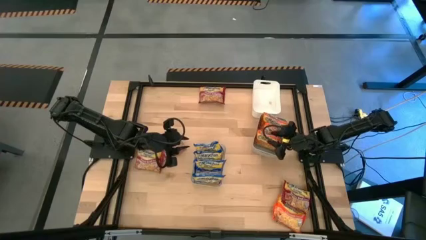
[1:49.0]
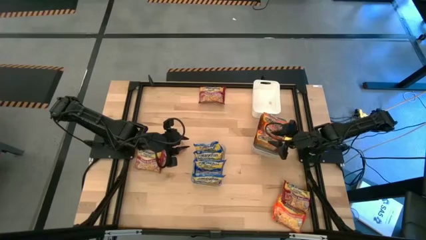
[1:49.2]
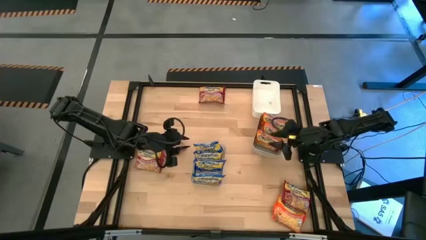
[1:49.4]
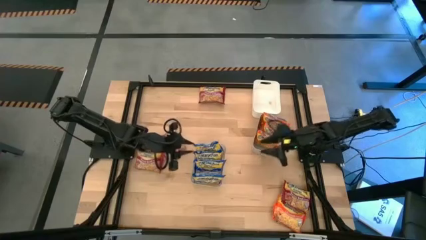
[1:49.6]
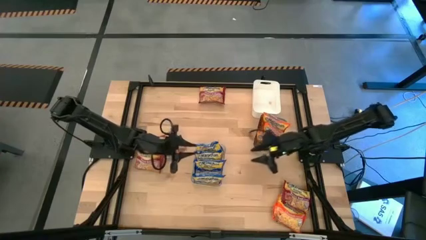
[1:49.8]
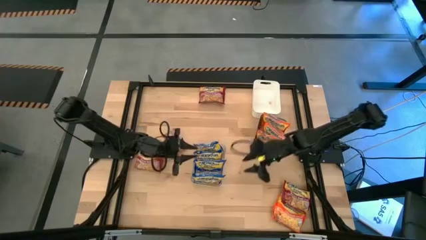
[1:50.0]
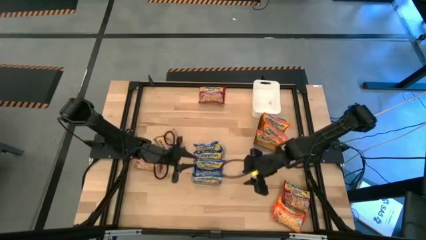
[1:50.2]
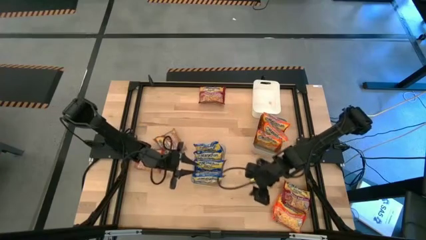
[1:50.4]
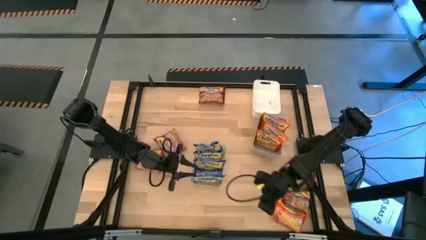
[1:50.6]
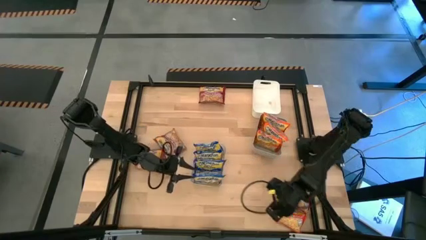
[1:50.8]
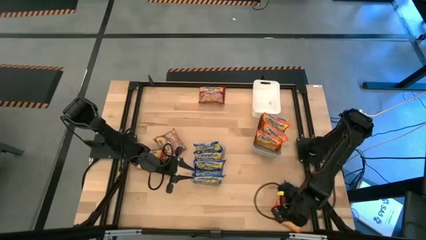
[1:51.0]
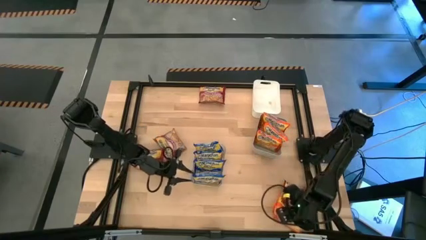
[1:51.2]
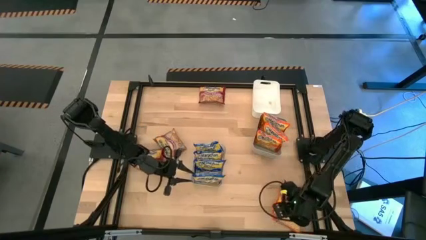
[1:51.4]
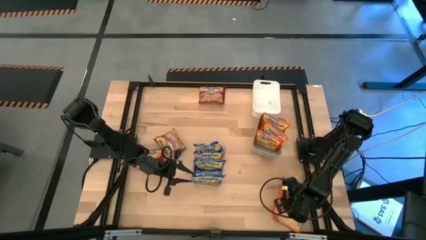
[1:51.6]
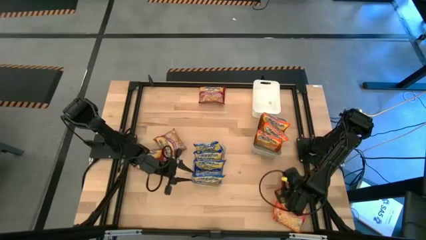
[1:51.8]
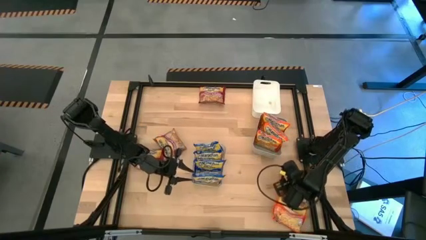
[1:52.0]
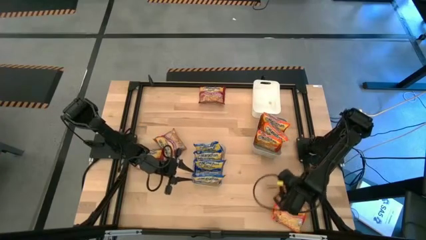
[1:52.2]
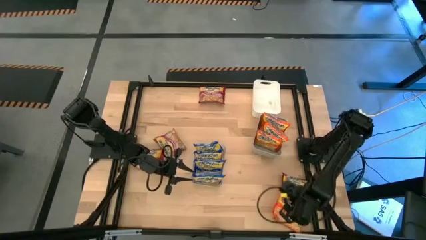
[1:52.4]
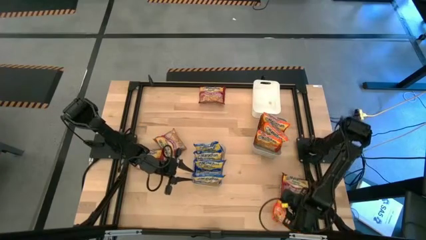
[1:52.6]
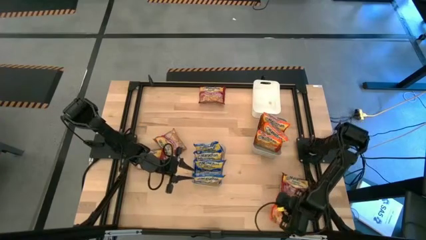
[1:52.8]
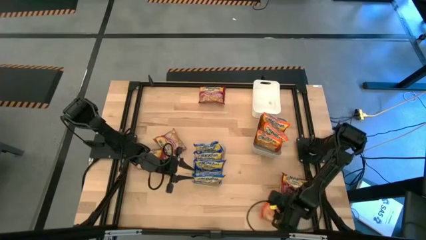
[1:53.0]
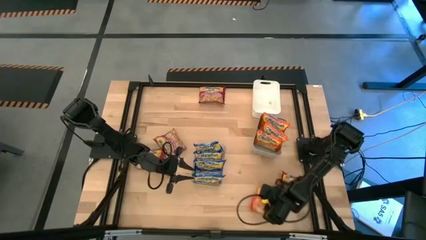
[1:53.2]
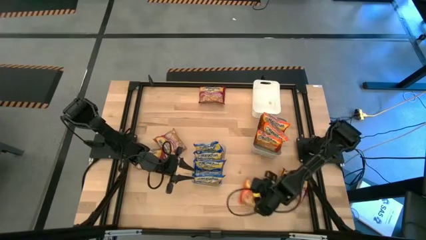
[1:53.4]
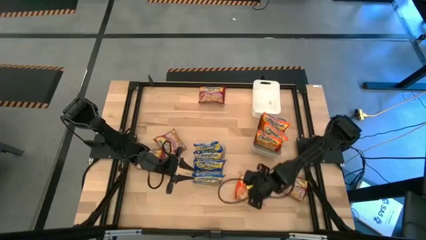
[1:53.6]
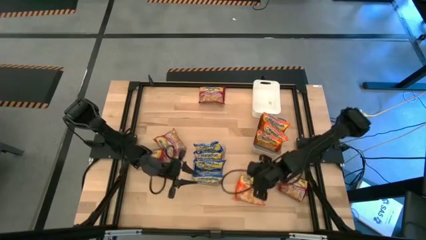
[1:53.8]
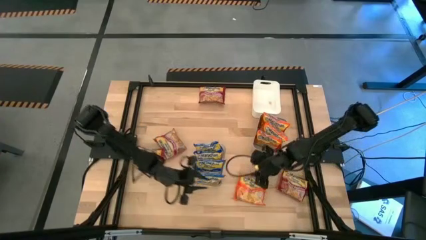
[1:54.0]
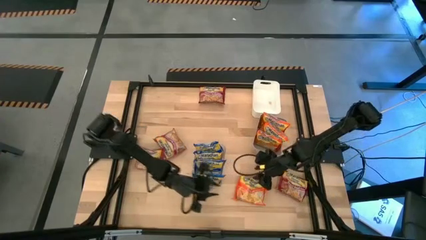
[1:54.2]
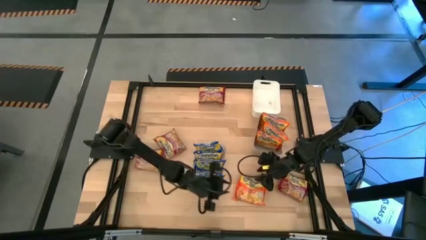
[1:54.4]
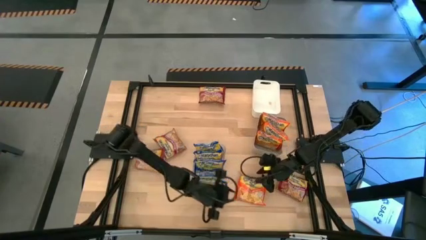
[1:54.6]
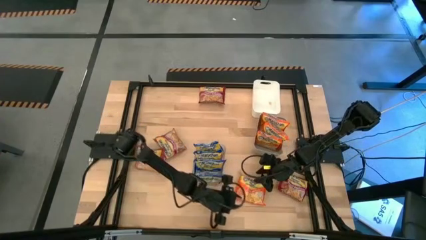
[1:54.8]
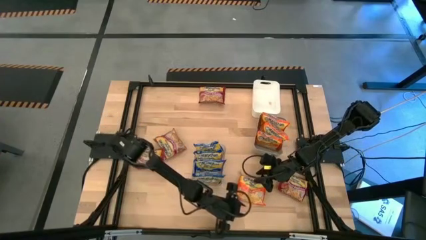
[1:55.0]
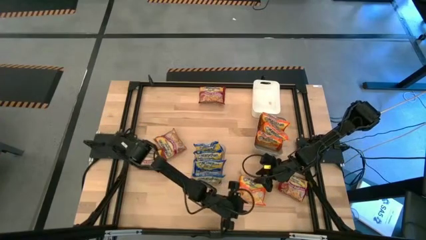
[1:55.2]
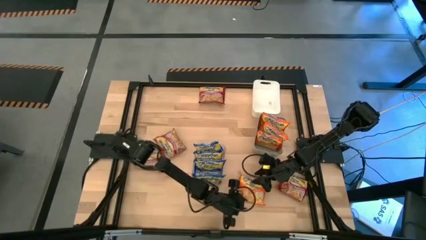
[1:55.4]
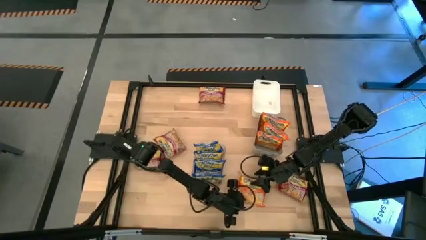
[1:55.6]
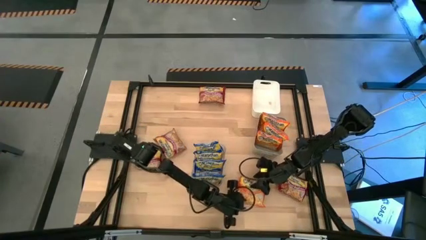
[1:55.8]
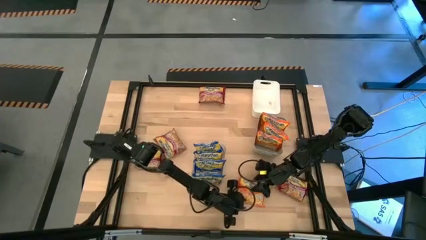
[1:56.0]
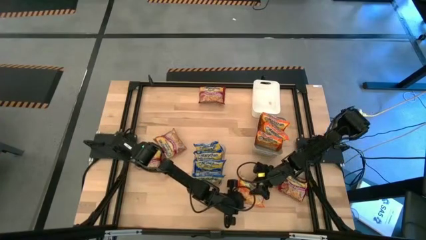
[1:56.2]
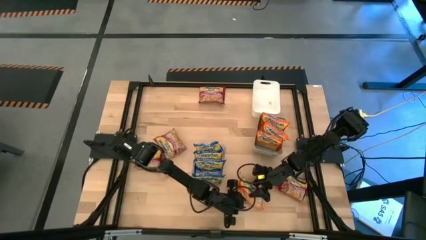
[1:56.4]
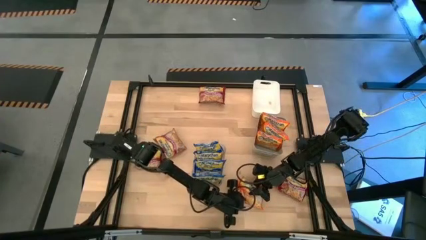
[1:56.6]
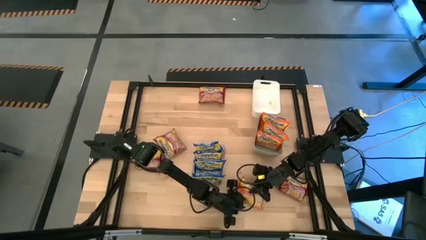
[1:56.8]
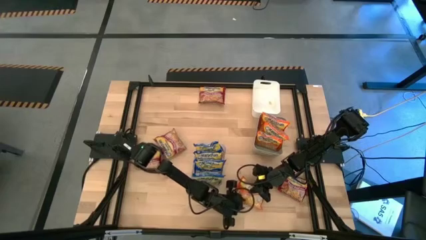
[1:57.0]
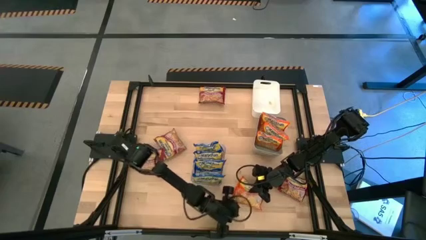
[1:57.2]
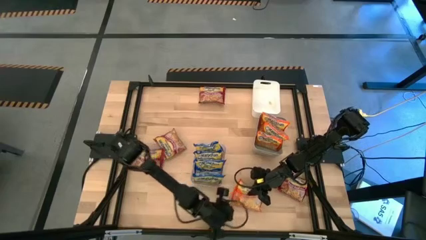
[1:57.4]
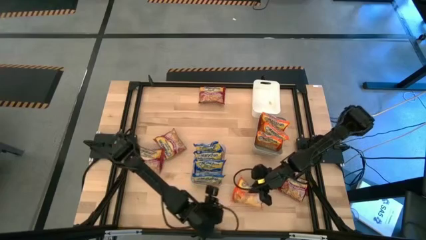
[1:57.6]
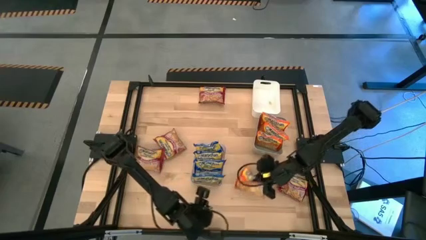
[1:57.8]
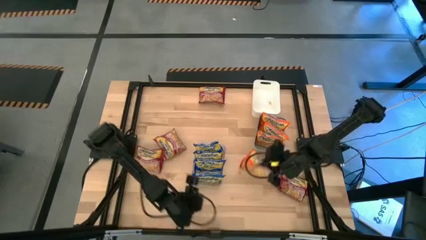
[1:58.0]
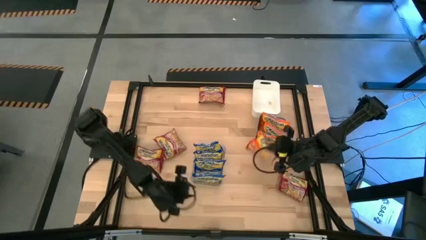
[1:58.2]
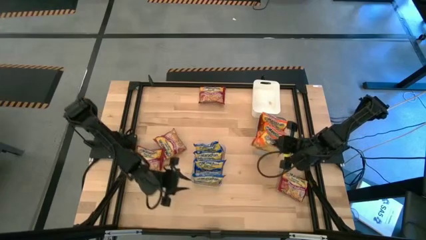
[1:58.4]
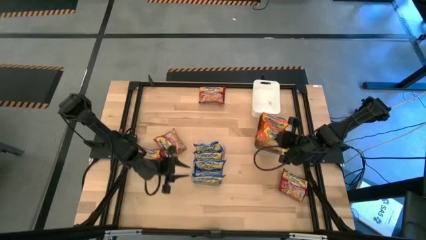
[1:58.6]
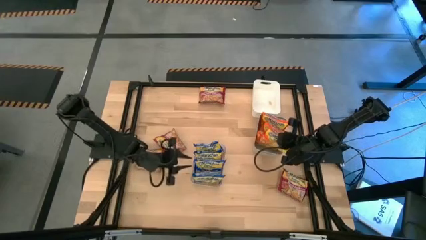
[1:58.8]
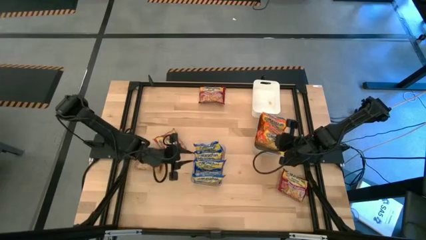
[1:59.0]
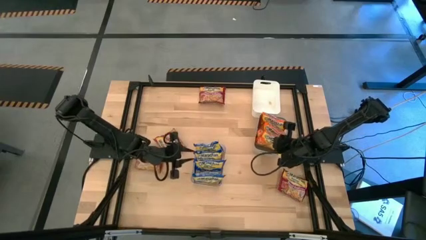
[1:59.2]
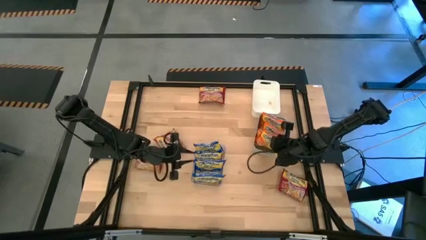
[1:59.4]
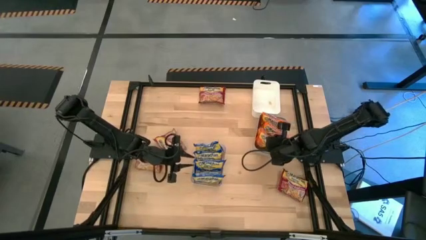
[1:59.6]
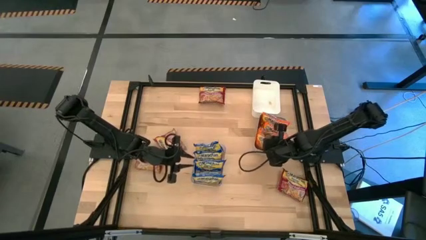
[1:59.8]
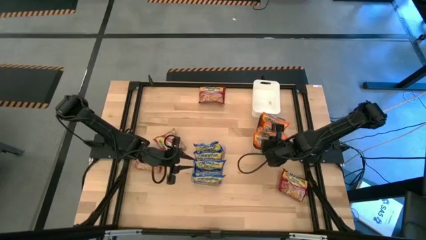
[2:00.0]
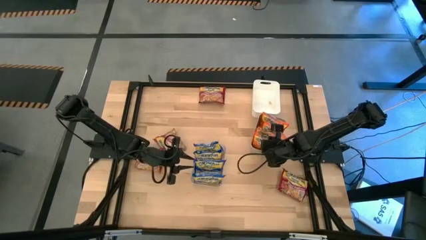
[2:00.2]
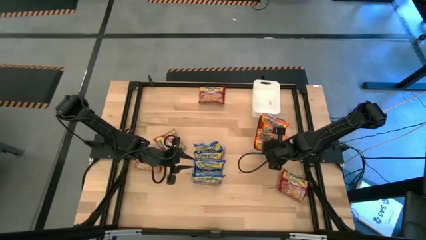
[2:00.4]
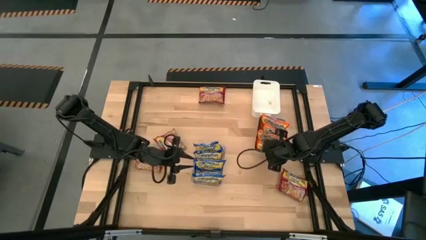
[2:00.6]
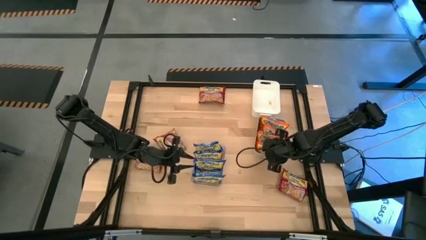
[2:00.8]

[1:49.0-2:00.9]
Task: Sort Maruchan noodles
Put the orange noodle pack into the gray bin

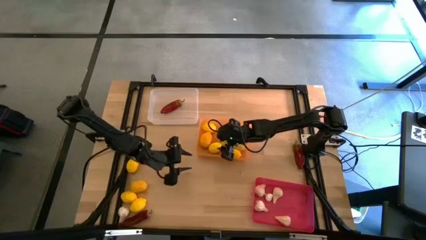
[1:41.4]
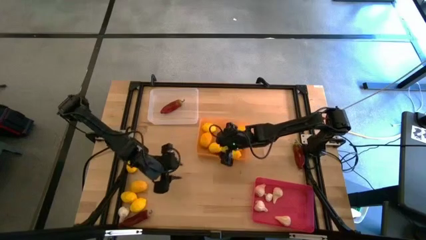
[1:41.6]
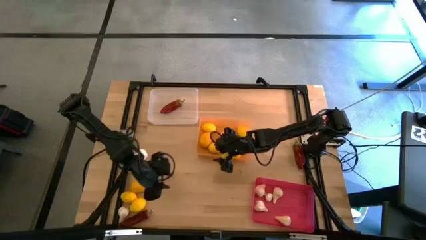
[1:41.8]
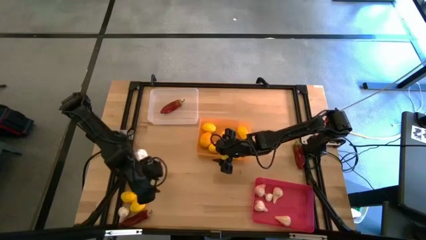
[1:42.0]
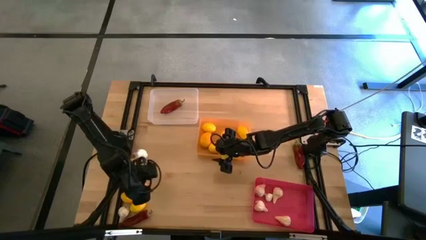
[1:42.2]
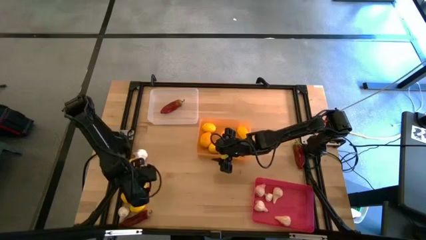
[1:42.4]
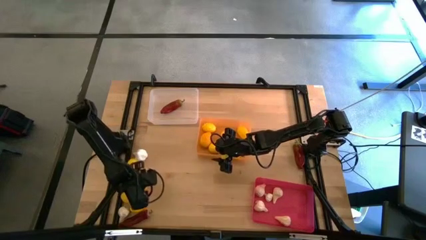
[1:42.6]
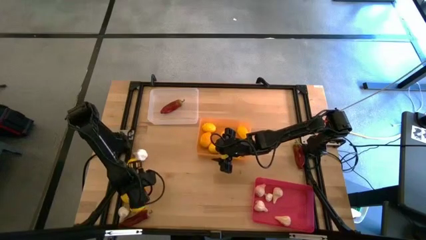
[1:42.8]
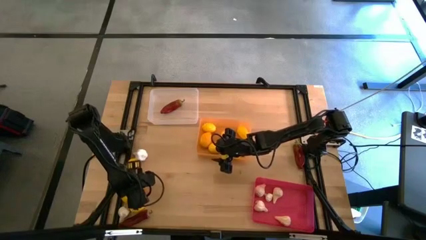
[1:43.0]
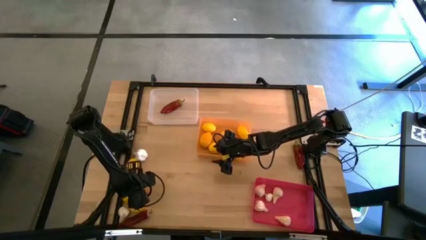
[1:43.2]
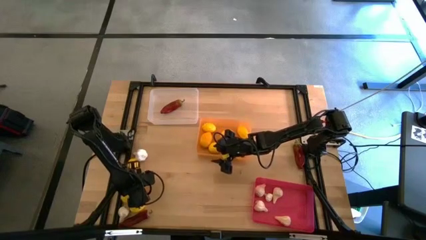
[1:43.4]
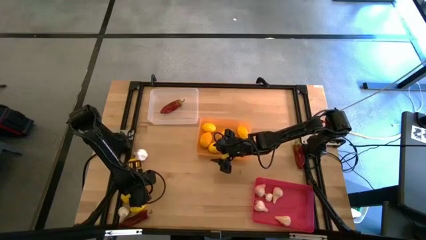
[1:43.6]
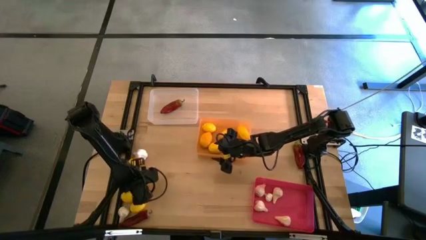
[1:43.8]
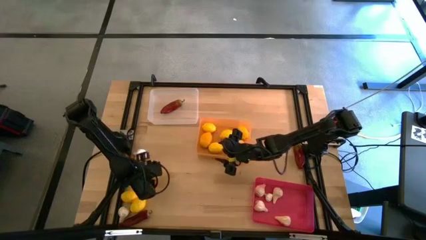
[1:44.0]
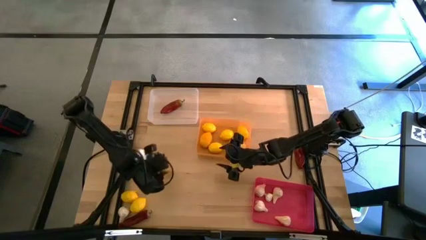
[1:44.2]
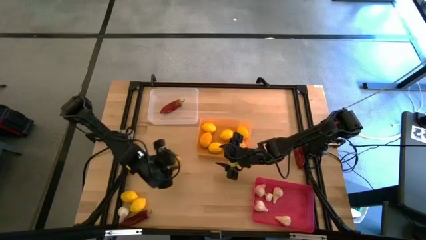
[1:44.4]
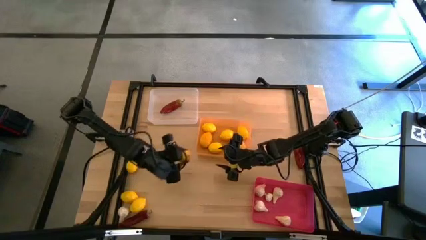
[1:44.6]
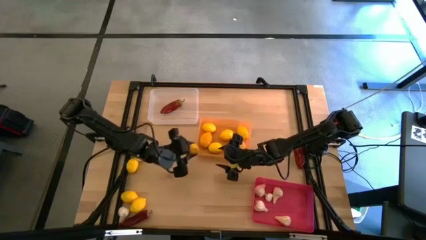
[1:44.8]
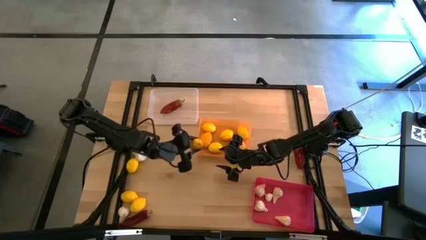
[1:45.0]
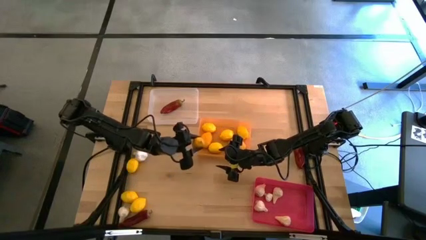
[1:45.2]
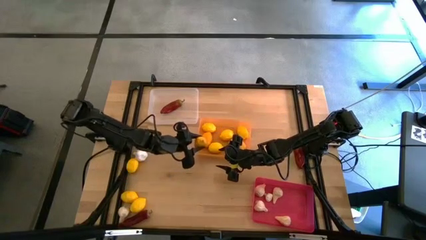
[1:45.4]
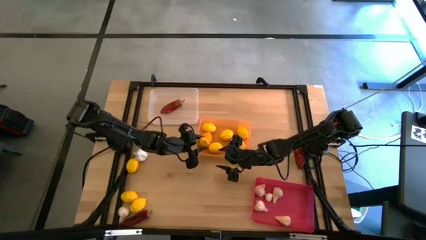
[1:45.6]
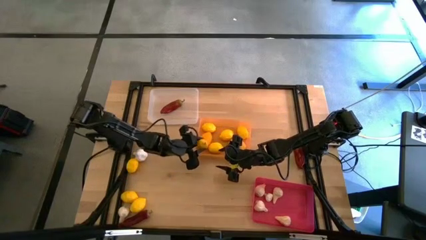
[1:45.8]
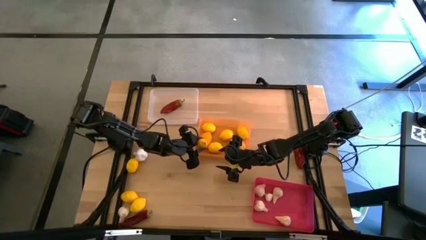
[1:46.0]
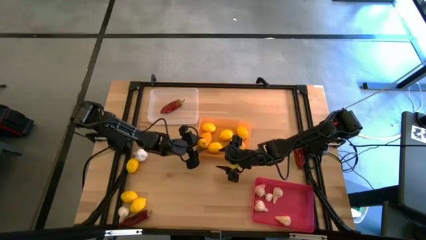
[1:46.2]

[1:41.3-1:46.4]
Task: Sort produce into baskets
Put the lemon into the orange bin
